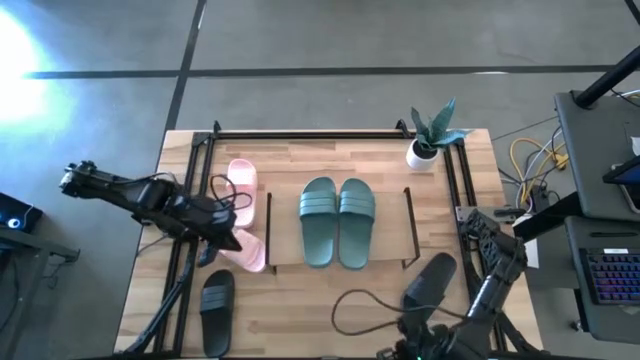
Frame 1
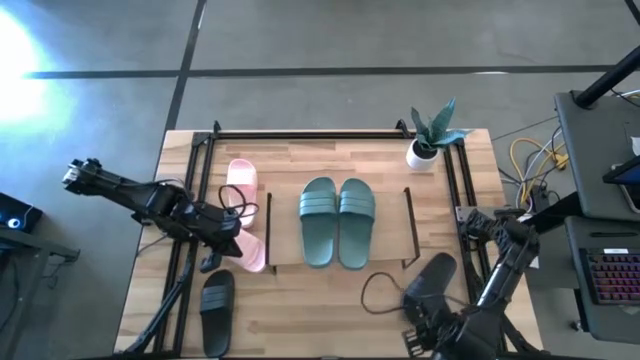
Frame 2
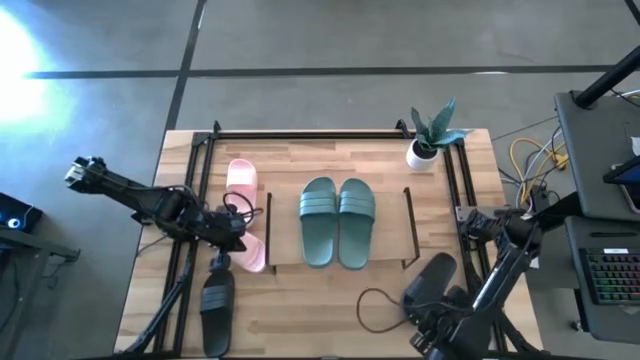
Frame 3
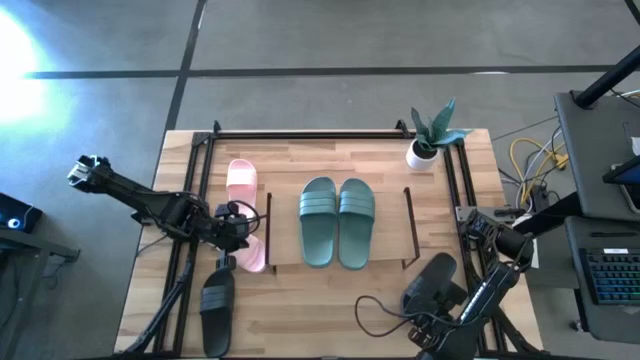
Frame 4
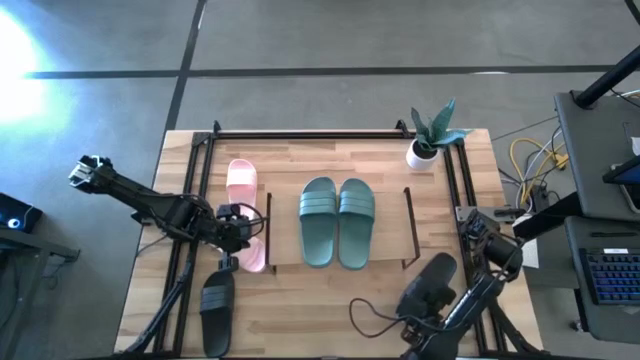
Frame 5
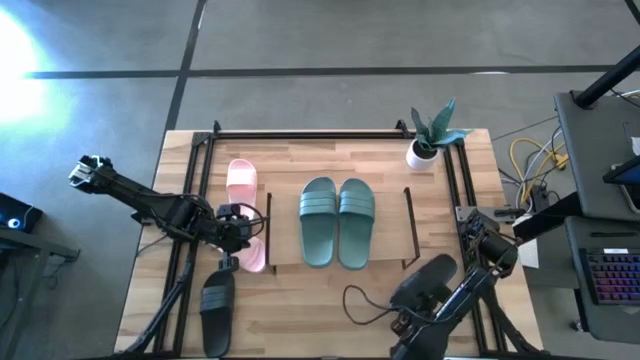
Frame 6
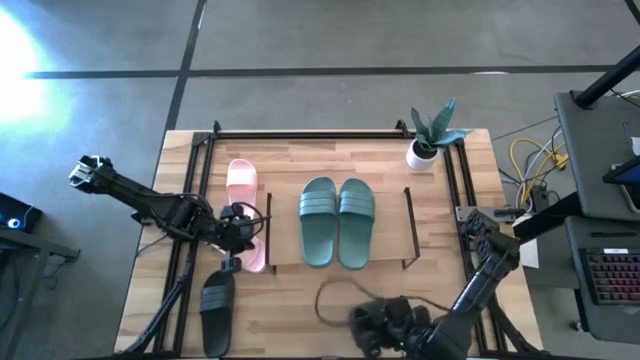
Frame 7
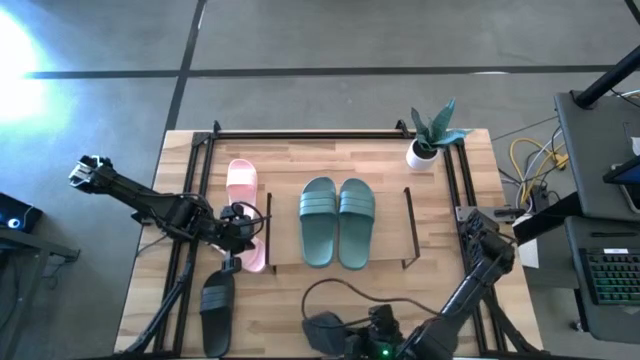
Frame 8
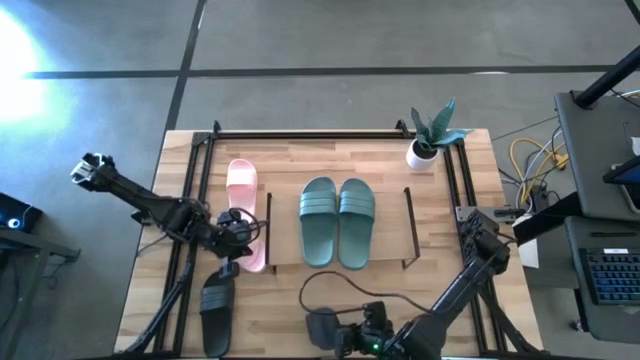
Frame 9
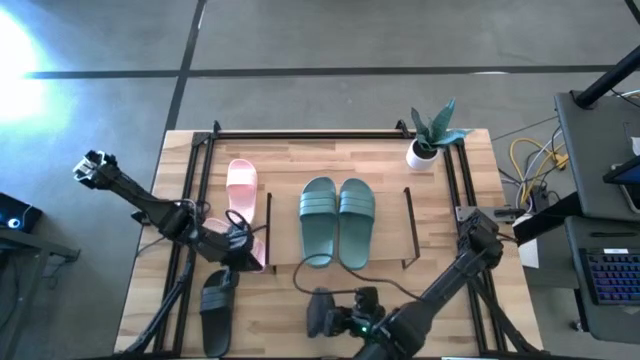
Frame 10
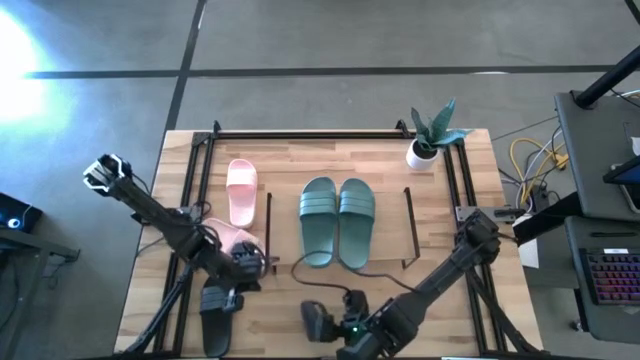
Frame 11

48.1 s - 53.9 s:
Task: Pick and place slides into the shelf
Put the right black slide under the shelf

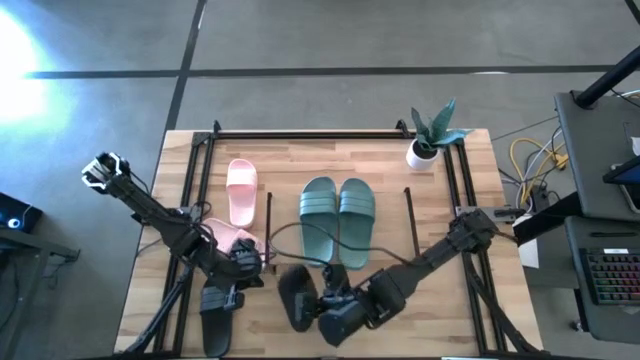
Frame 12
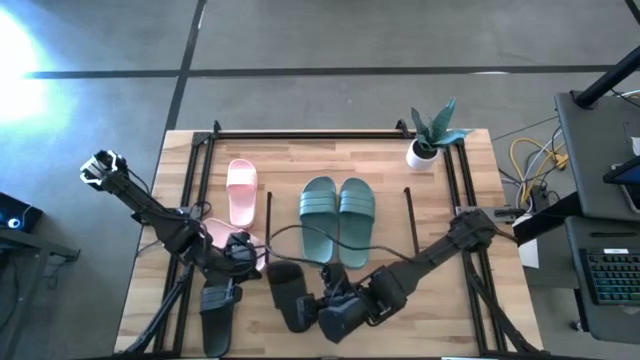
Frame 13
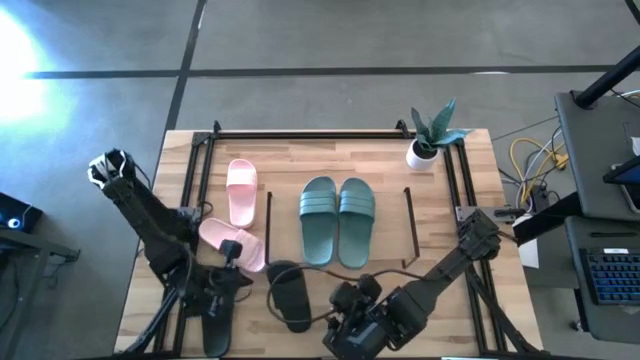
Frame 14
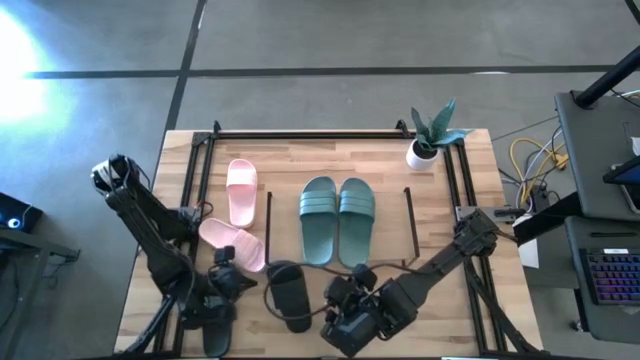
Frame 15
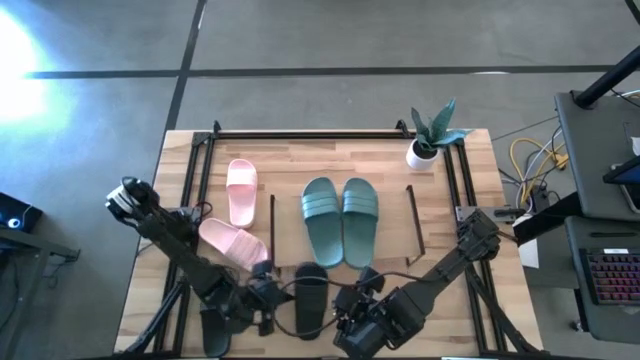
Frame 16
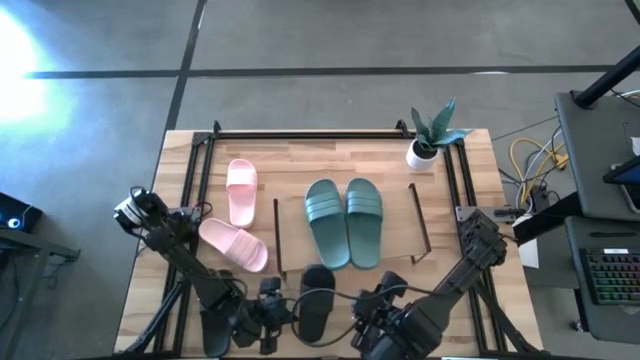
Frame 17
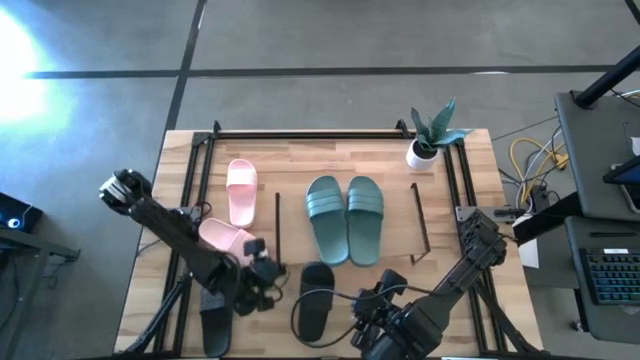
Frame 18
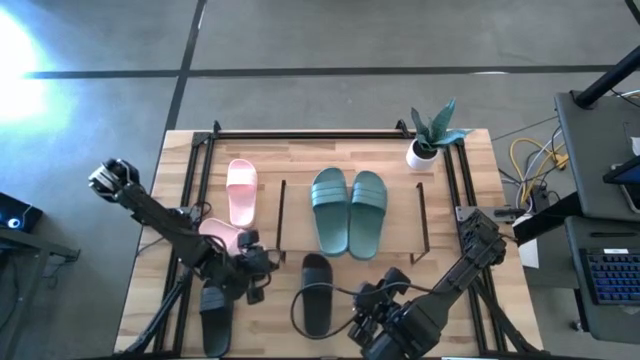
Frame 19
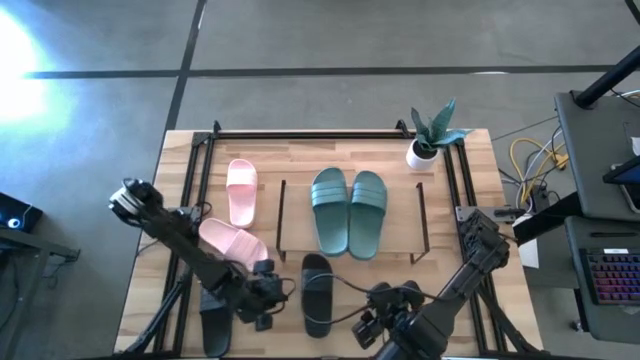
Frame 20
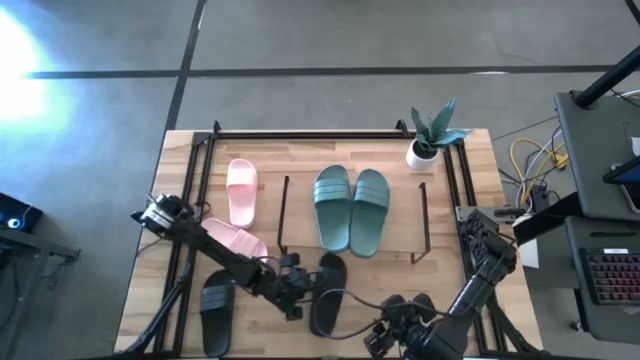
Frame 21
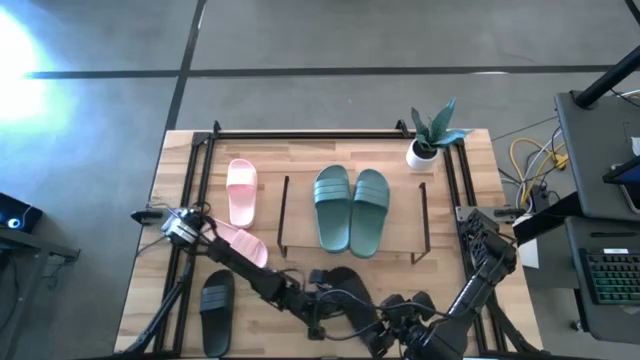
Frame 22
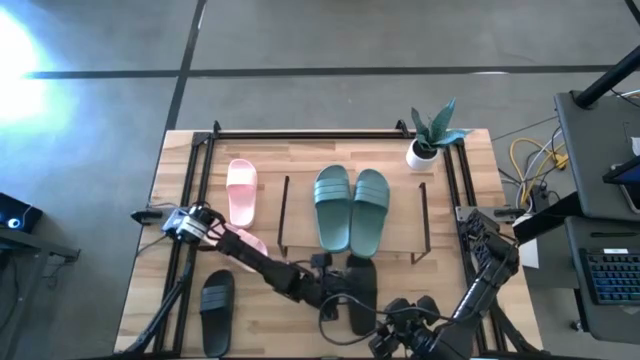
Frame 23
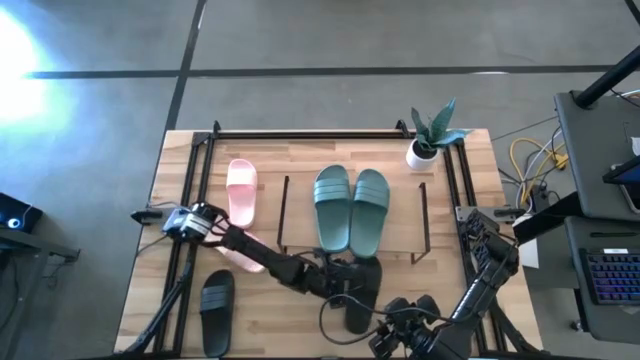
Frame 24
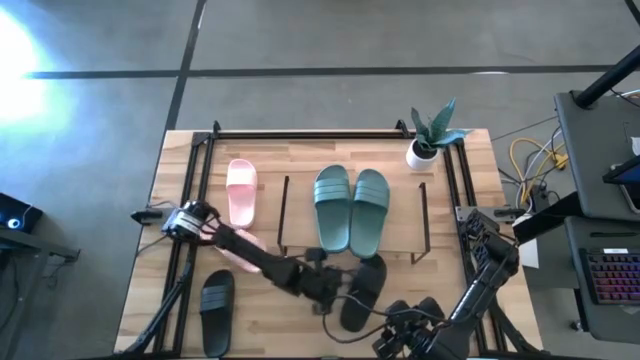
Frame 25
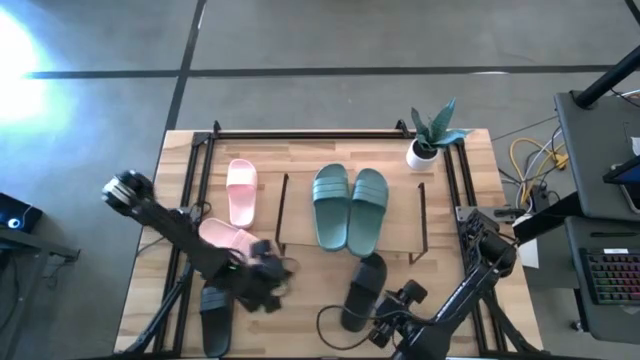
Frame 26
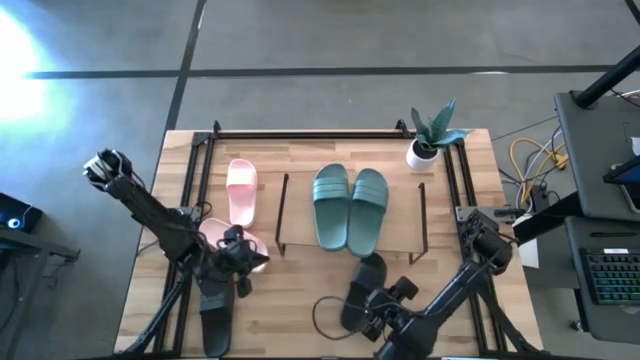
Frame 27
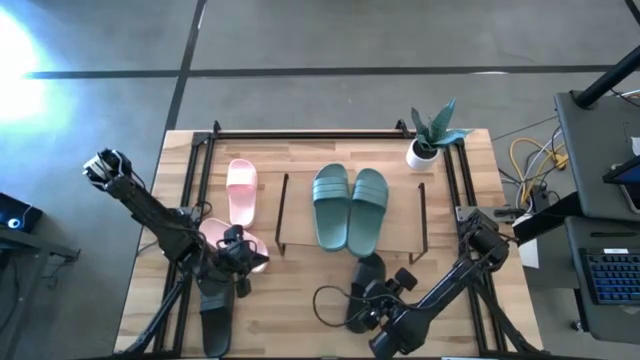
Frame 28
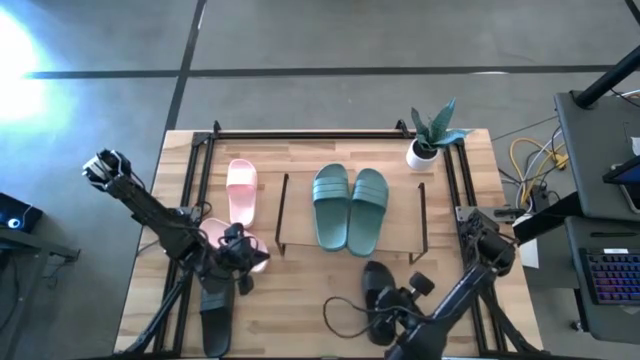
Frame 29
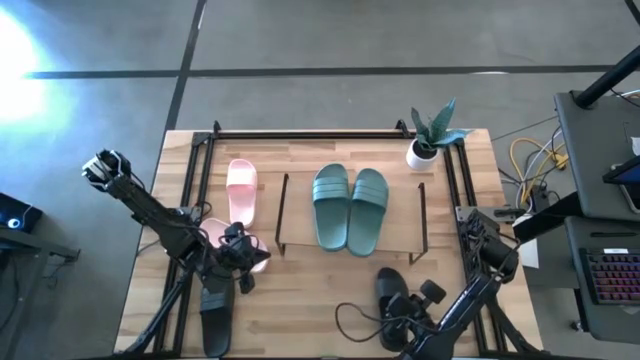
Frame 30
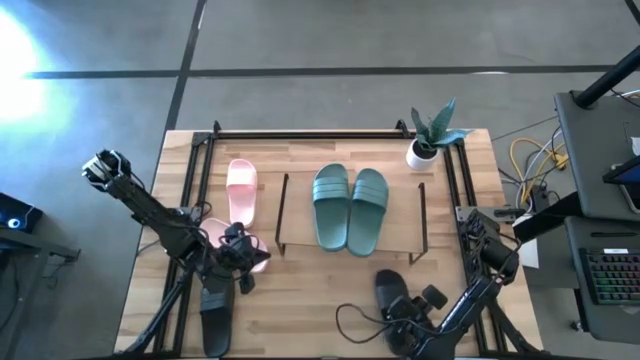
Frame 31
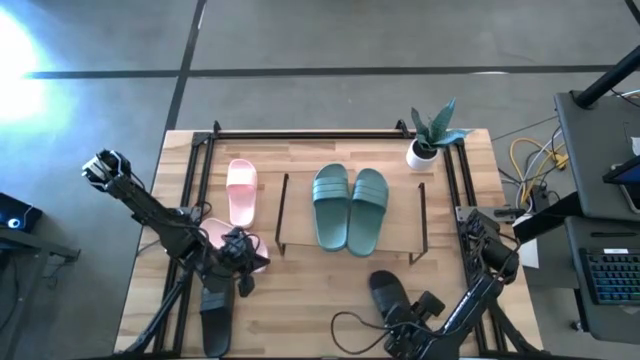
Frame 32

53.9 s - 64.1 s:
Put the right black slide under the shelf

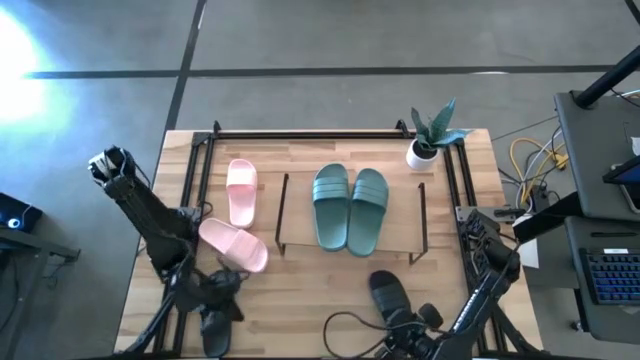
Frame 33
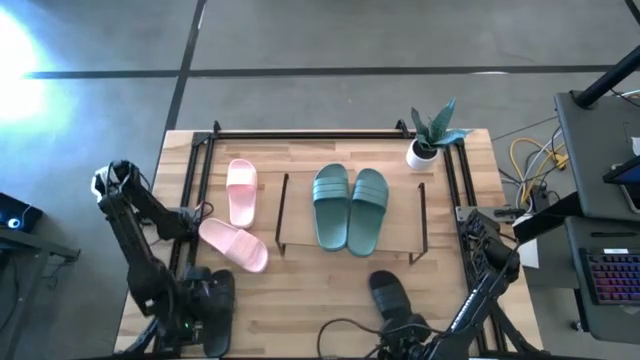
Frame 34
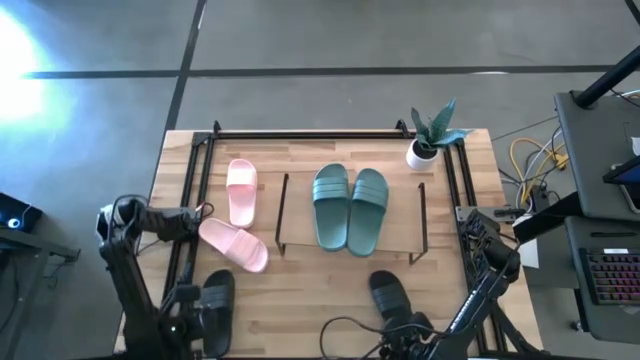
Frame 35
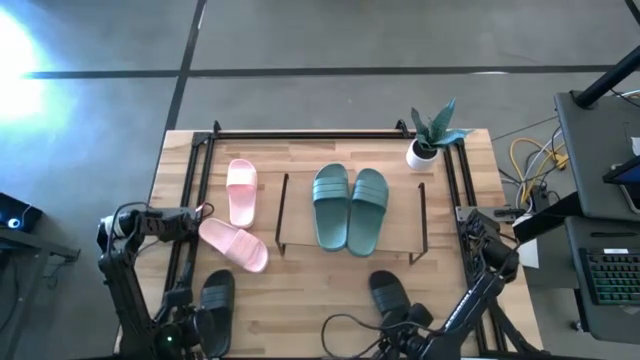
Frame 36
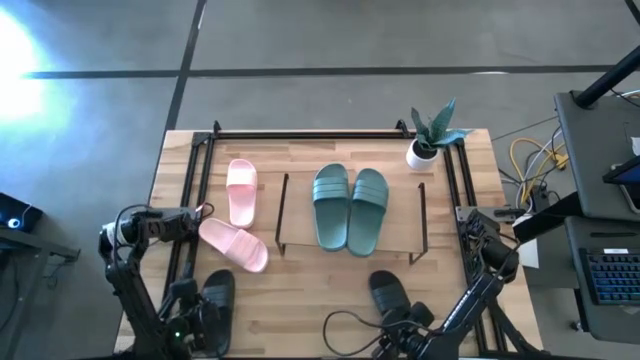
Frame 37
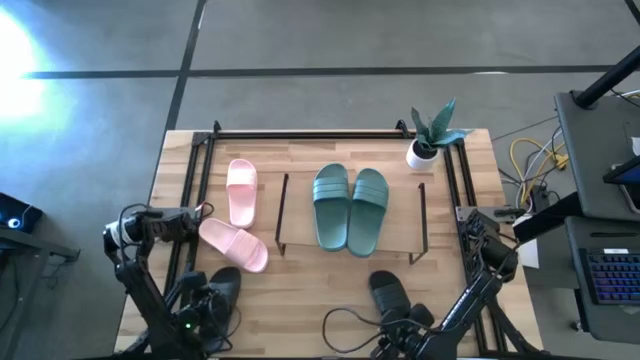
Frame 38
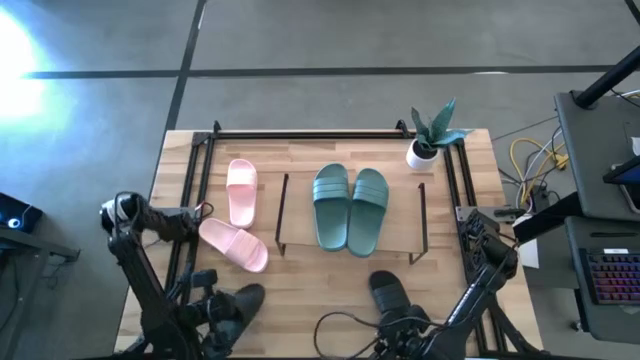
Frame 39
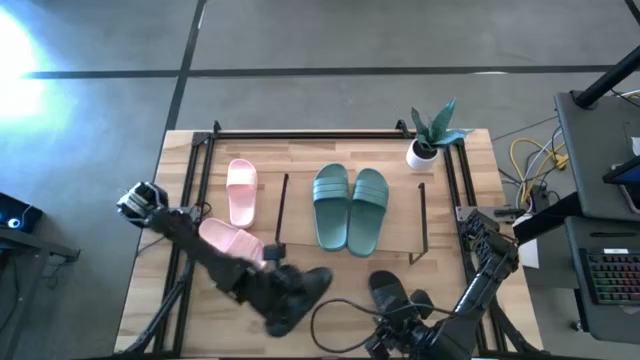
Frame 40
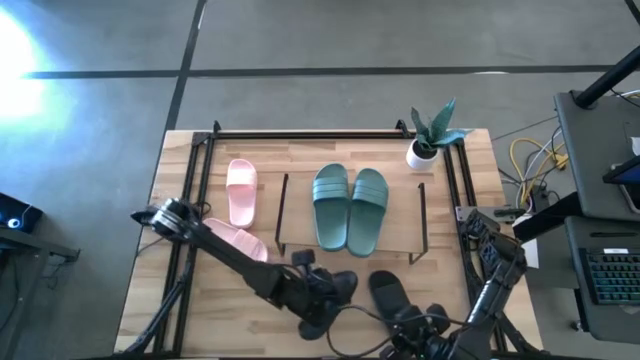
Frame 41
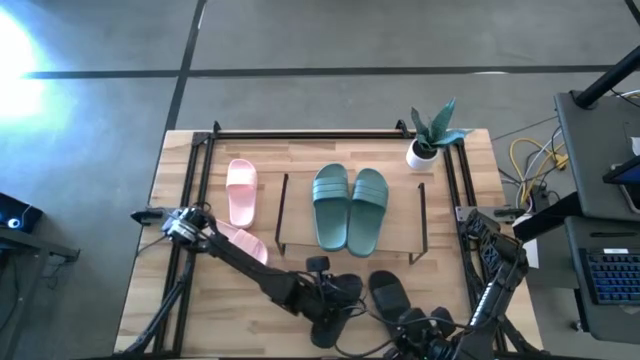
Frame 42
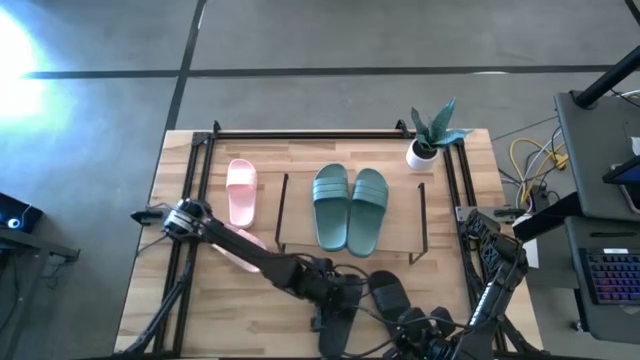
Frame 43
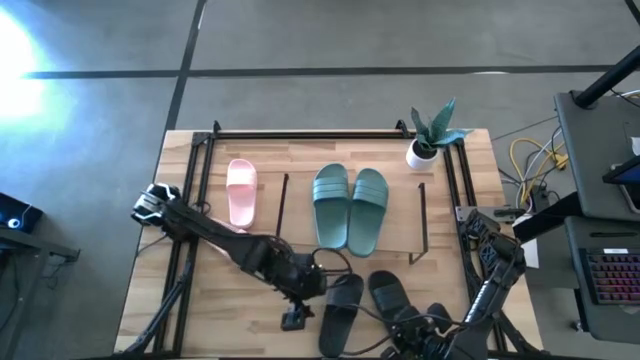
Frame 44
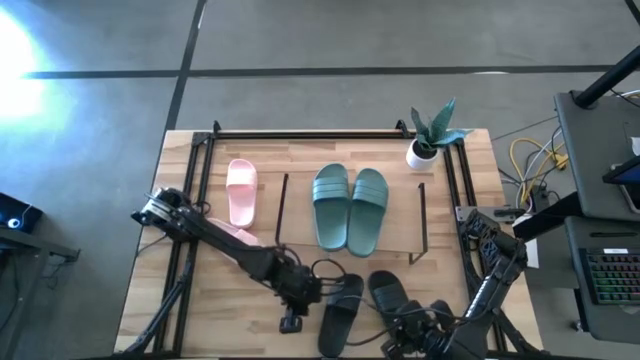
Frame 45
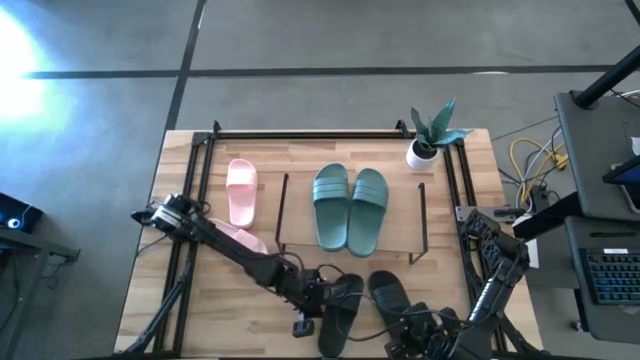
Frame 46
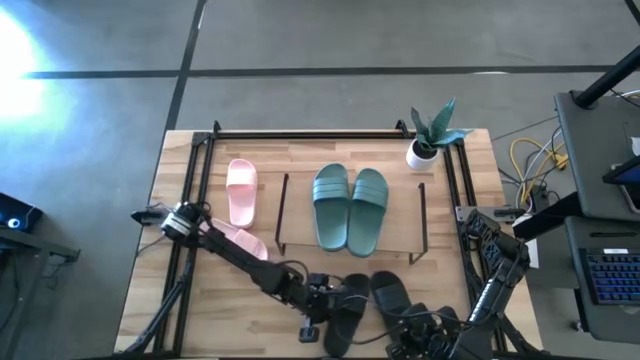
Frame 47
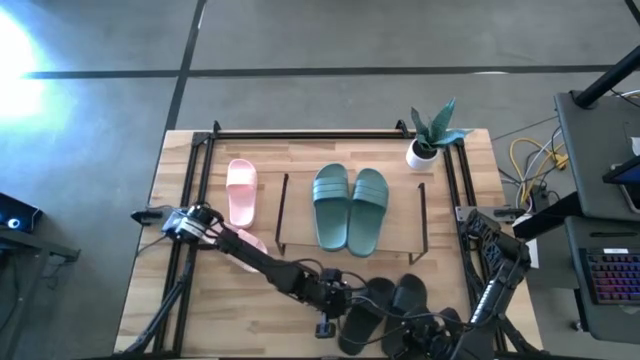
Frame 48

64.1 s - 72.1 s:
Put the black slide under the shelf
